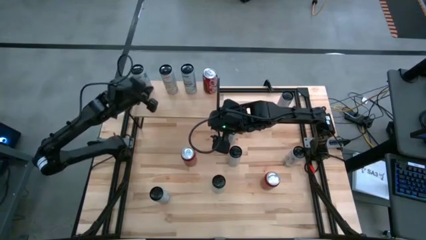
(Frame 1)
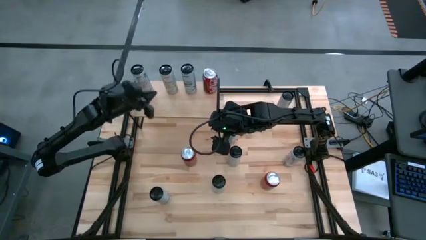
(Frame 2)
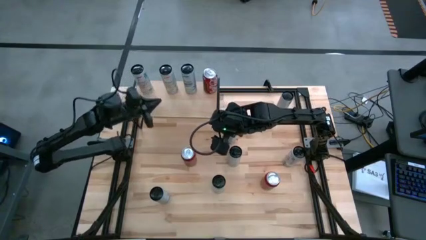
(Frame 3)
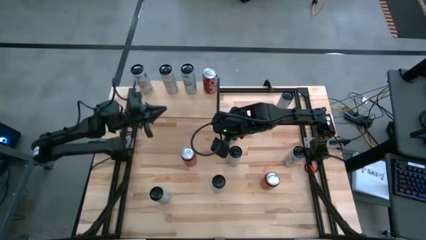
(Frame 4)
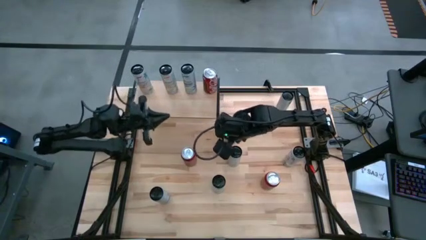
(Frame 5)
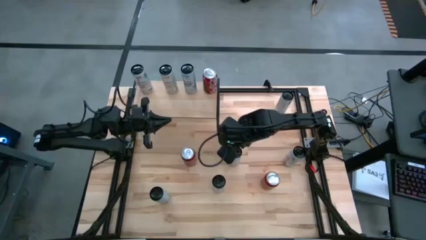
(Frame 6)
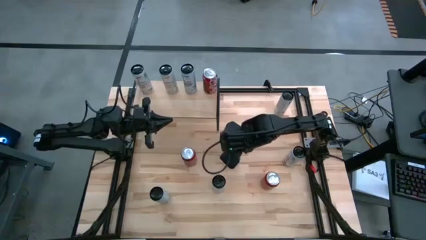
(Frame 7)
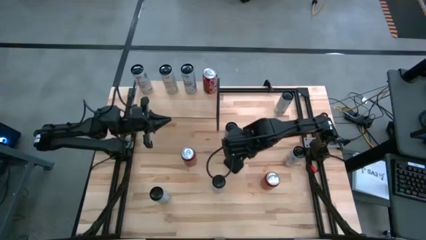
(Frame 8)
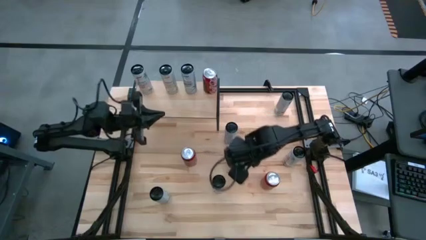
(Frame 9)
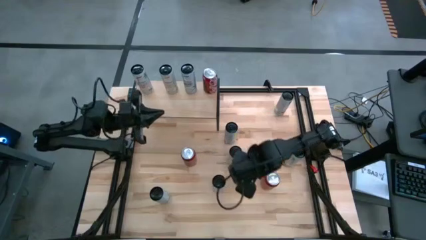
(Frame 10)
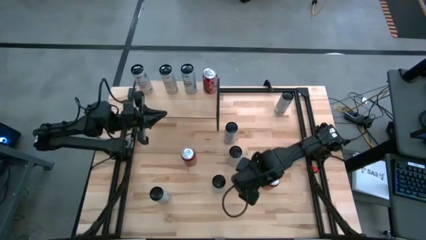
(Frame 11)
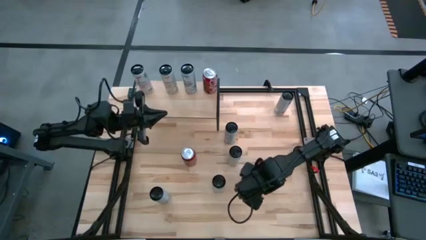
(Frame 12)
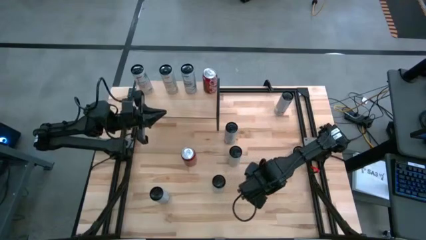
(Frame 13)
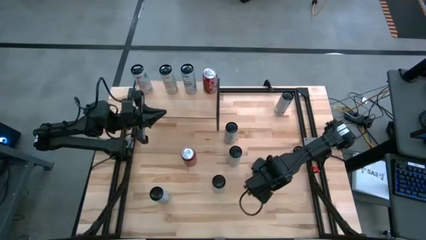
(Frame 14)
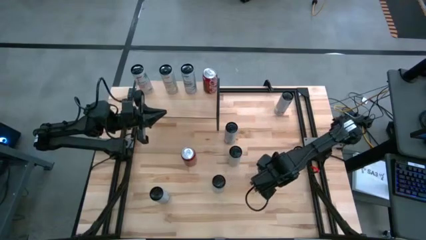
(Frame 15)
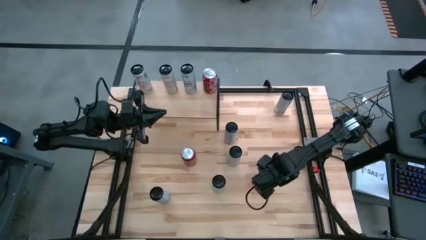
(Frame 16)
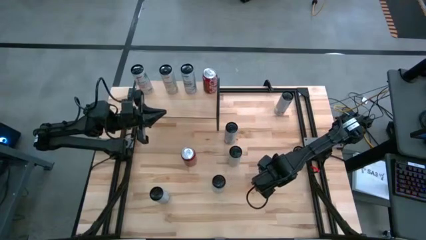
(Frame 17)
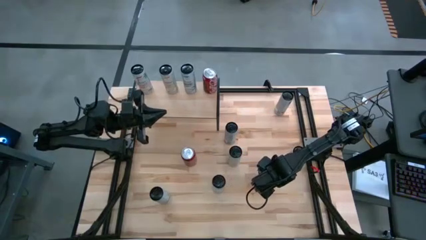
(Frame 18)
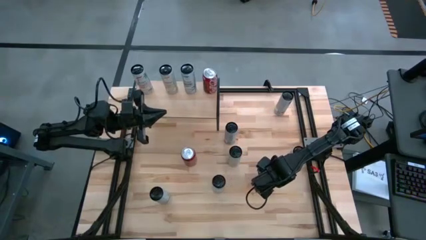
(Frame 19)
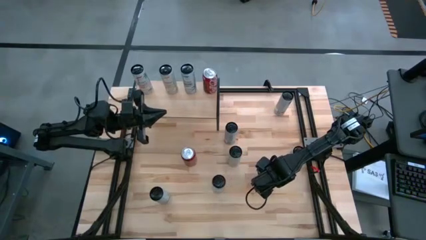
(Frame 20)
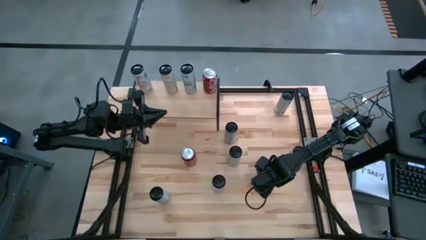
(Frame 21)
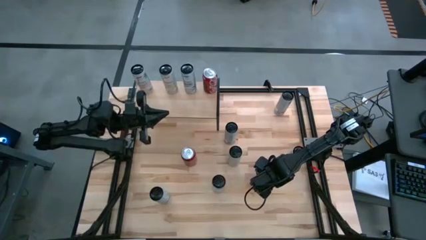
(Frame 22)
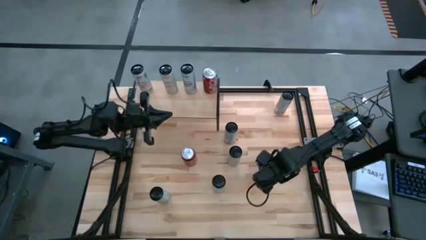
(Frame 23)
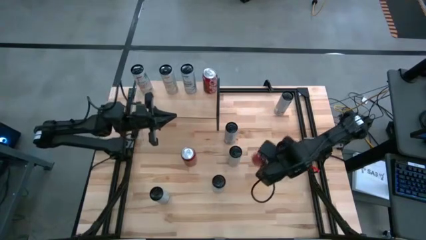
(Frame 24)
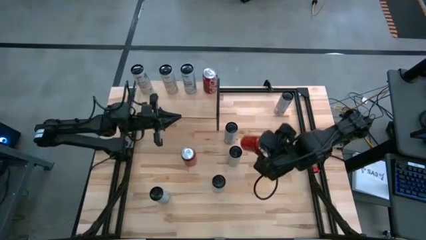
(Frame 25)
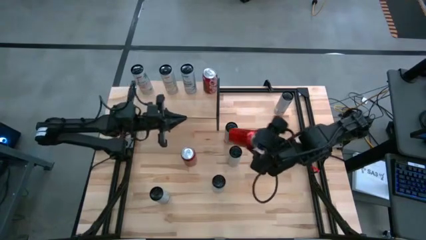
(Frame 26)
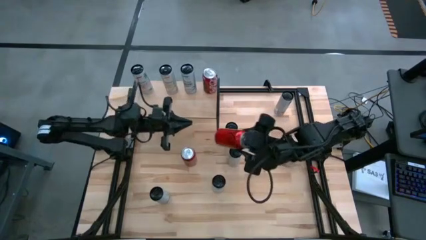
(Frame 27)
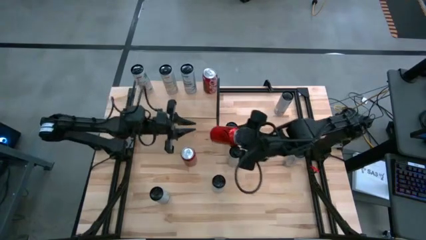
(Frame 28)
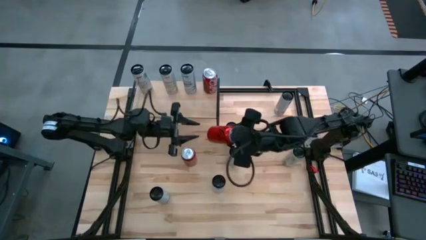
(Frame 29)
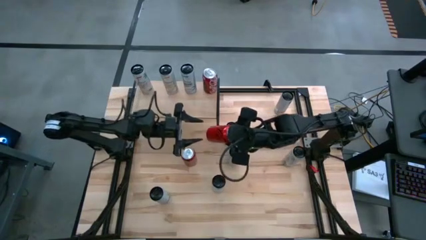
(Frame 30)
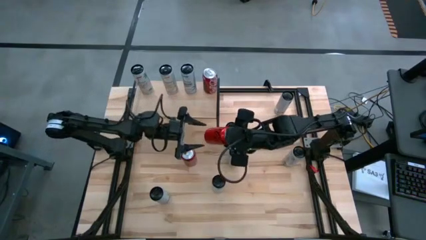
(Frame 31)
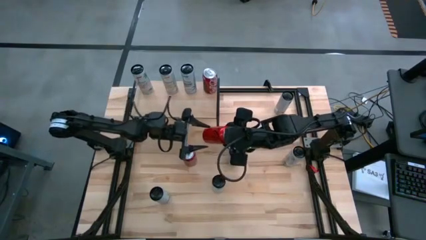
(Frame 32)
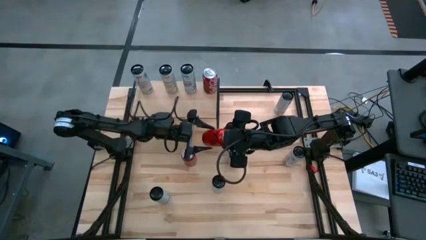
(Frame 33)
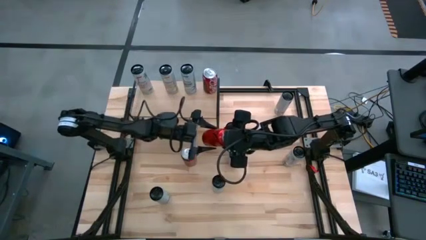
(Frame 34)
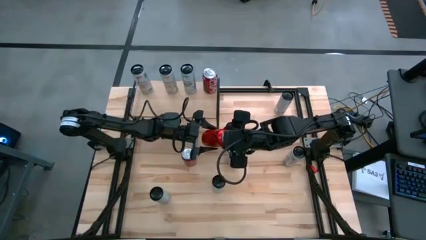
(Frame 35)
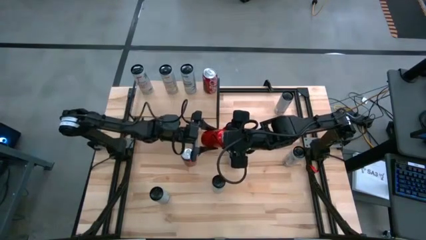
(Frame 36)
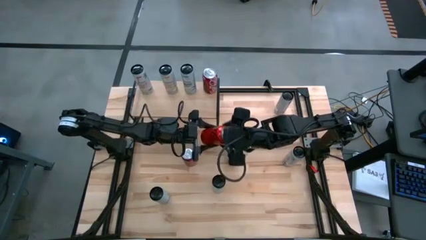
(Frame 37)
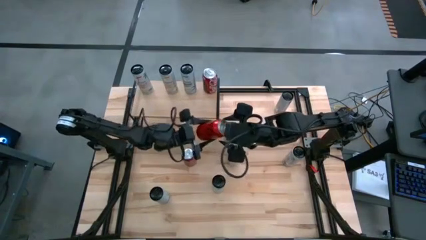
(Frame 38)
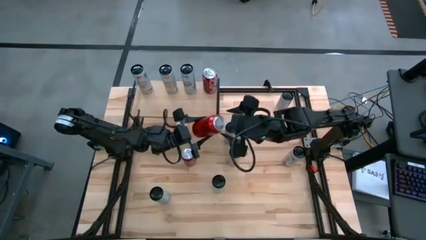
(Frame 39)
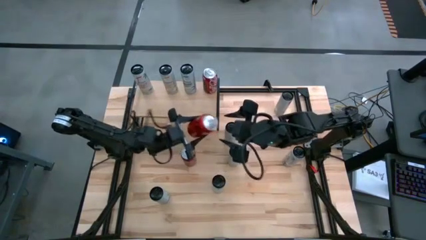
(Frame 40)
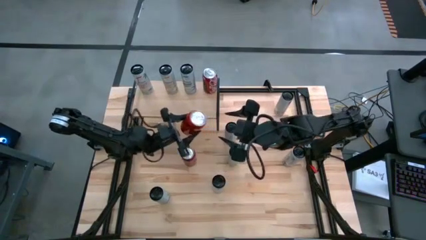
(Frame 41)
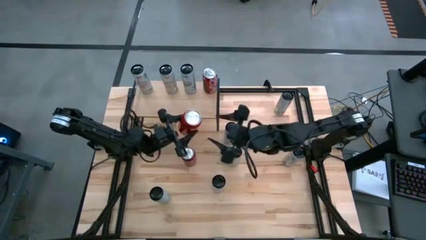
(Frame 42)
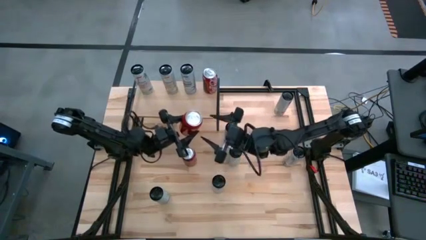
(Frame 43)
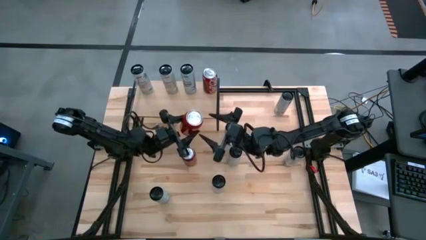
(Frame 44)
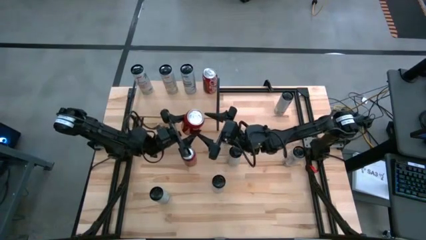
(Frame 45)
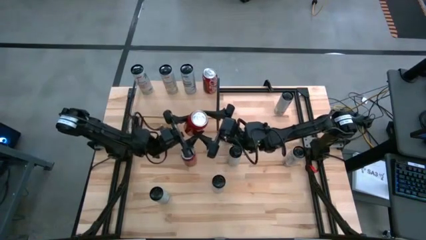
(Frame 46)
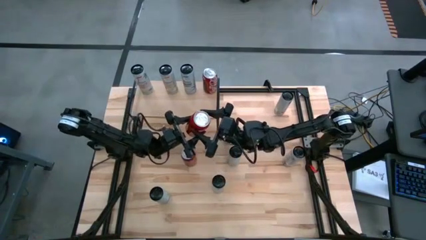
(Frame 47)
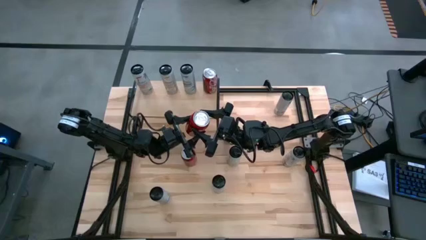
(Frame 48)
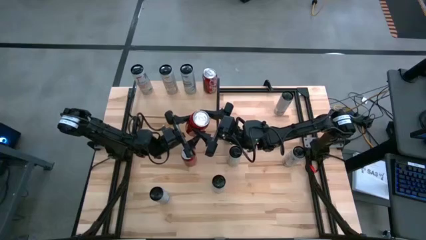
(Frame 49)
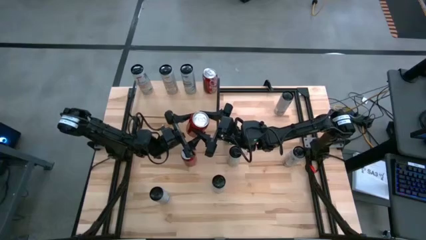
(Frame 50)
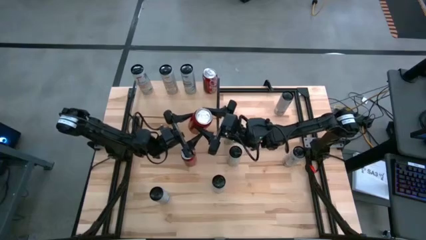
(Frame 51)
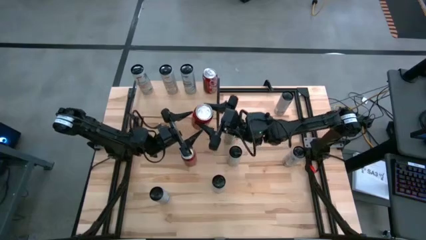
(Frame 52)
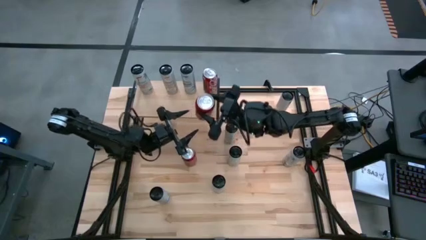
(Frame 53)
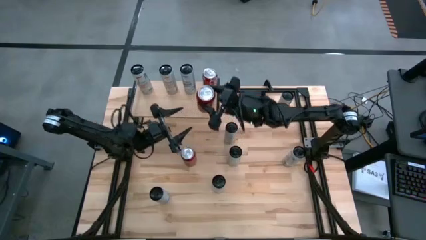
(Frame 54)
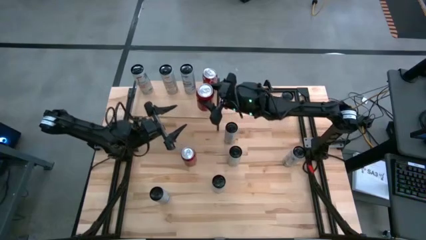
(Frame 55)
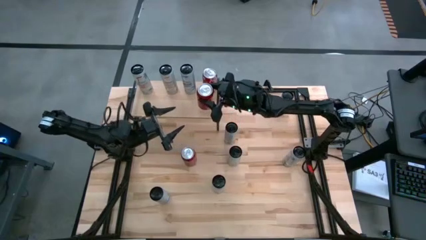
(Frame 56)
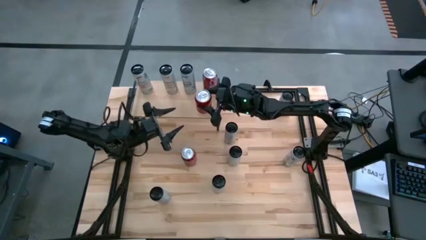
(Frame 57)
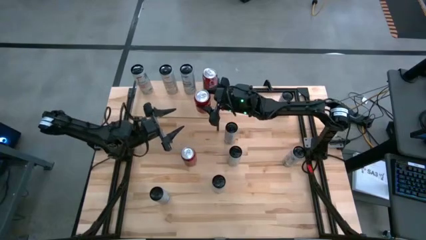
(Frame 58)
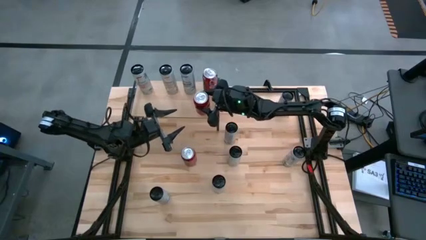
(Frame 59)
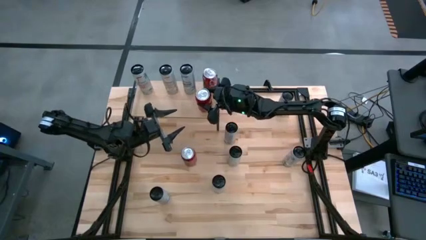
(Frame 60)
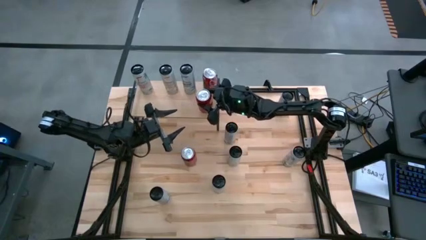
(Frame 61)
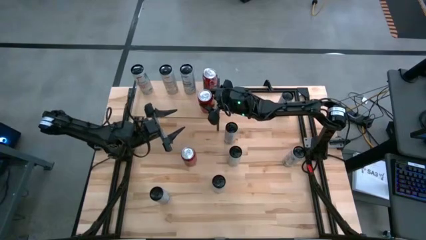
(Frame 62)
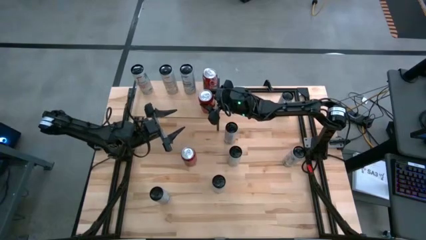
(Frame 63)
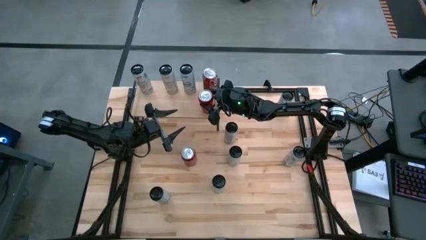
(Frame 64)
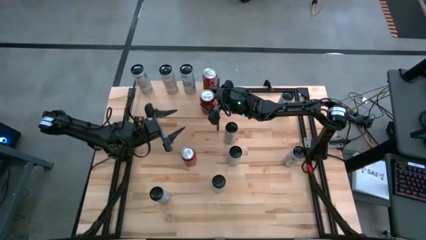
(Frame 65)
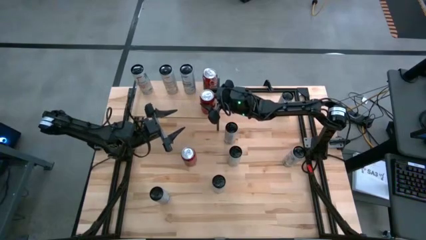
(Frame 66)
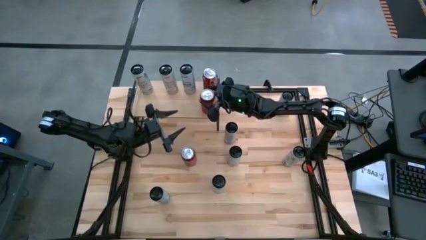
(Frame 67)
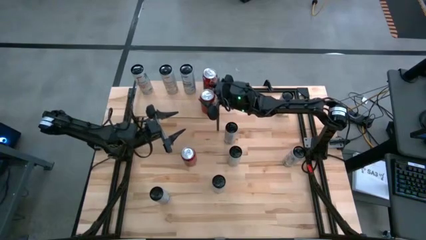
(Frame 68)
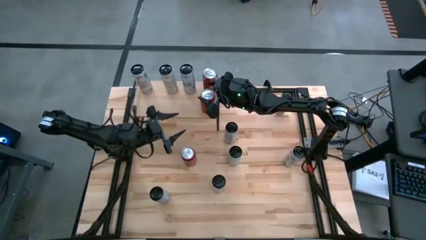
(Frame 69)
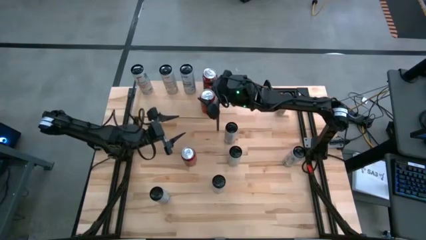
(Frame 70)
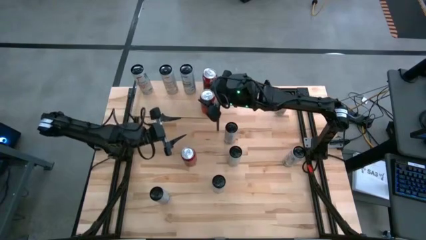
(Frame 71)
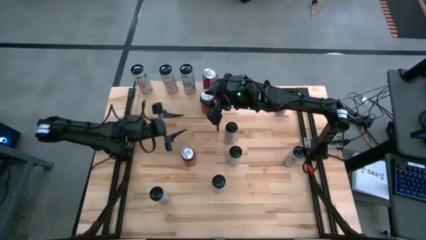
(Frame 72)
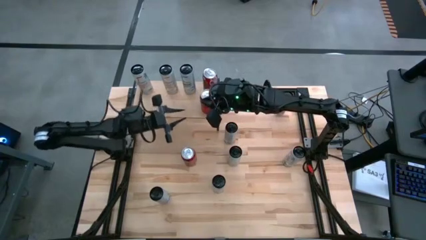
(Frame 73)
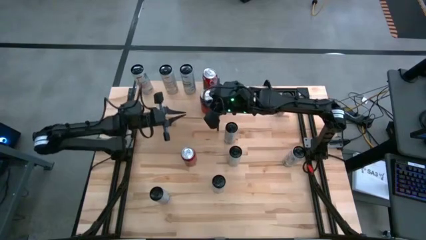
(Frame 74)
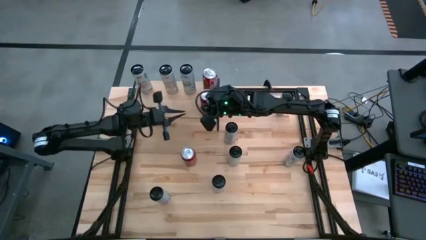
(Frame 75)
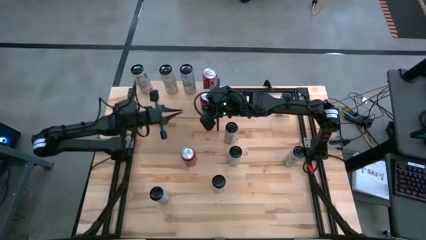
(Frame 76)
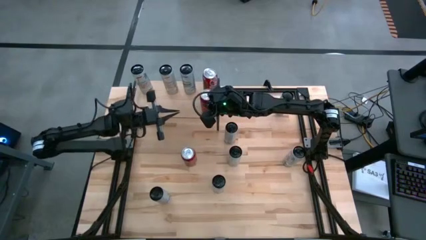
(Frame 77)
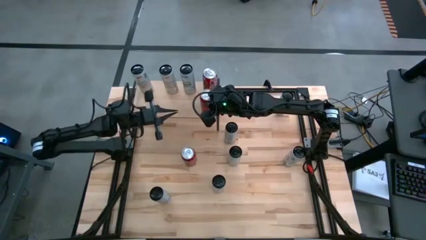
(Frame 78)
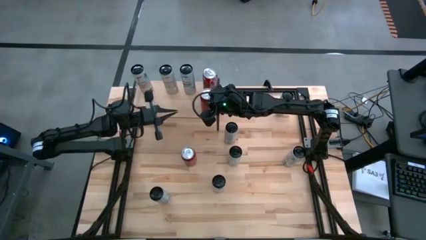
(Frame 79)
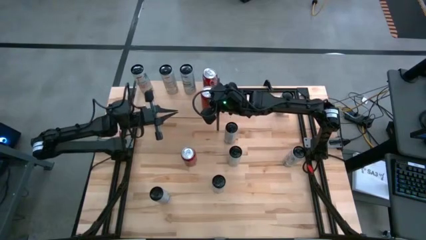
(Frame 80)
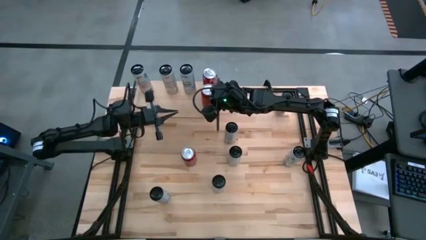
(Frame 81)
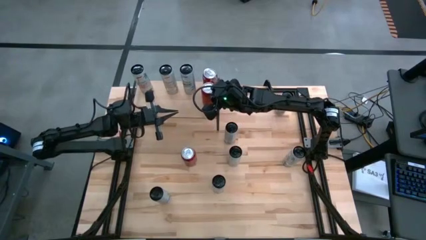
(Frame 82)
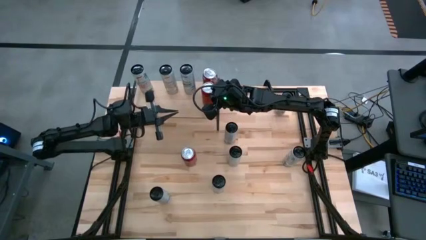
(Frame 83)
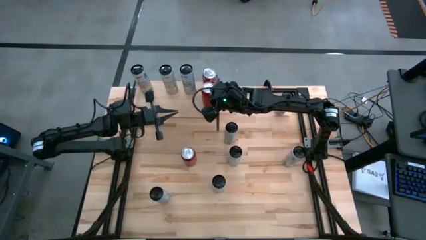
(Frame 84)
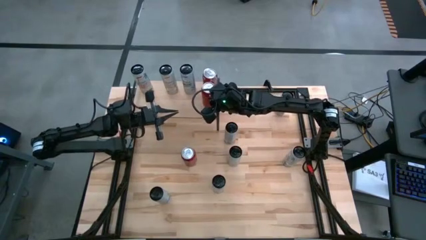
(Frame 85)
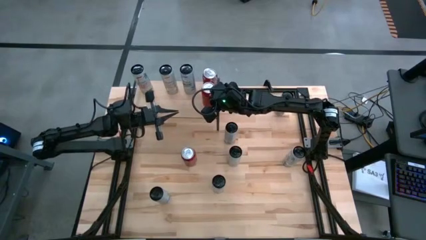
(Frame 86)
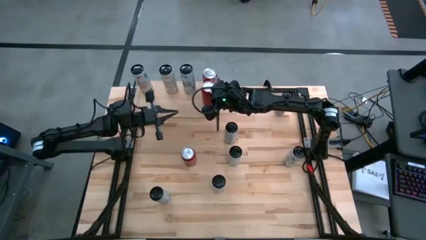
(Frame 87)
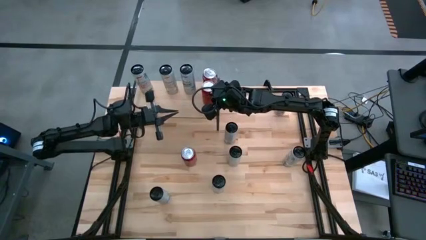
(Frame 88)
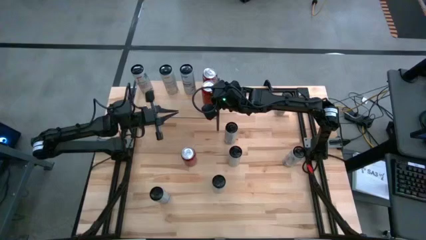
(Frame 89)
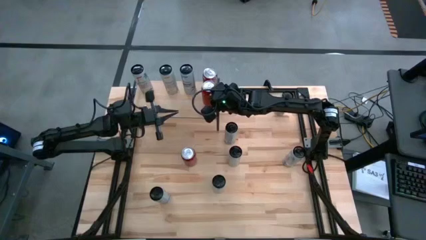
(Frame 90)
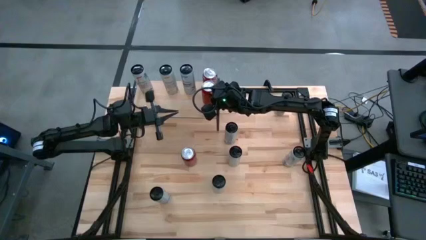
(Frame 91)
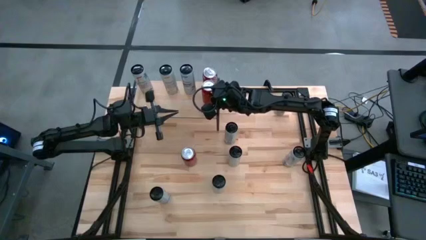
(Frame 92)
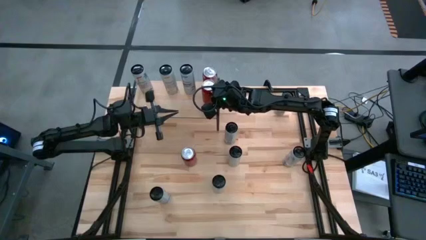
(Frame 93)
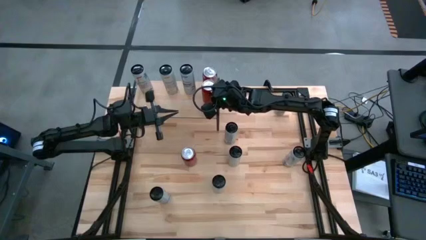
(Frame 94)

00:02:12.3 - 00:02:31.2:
Task: Place canned beverage on shelf
Put the right red soda can on the shelf aligned with the other red soda can
